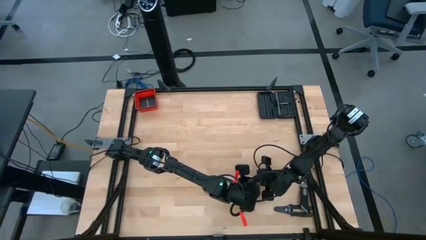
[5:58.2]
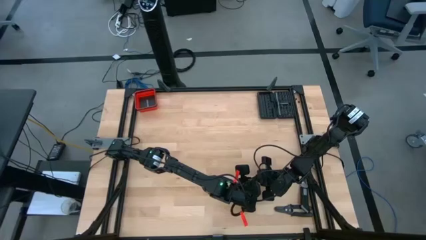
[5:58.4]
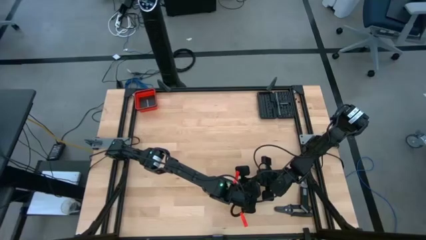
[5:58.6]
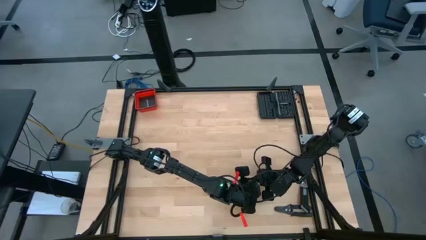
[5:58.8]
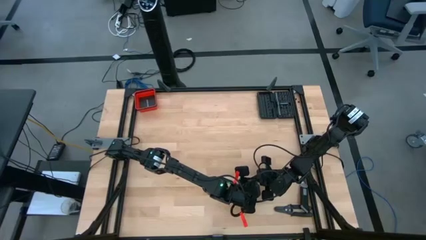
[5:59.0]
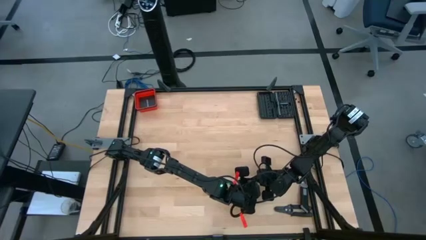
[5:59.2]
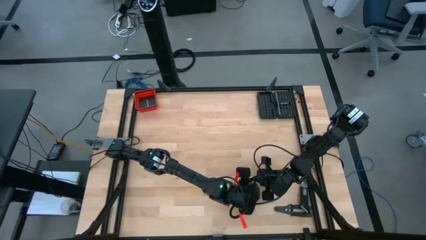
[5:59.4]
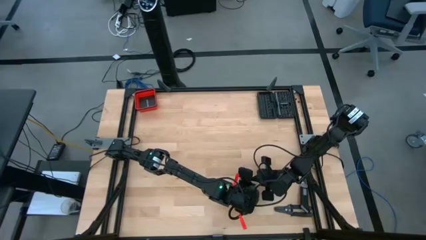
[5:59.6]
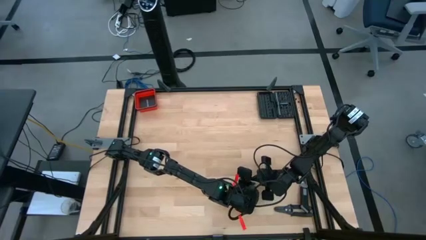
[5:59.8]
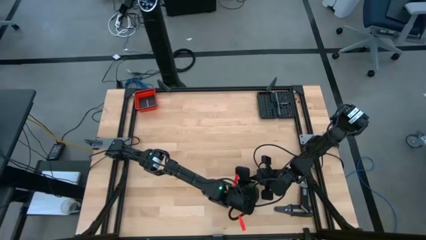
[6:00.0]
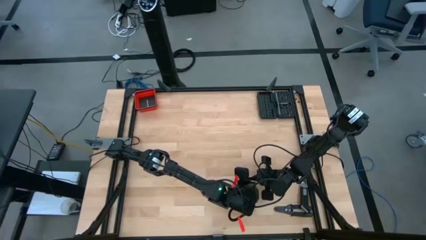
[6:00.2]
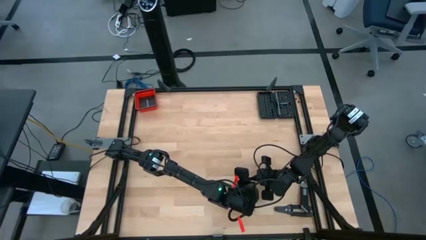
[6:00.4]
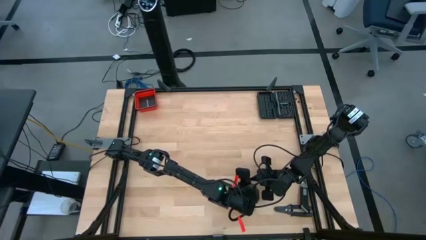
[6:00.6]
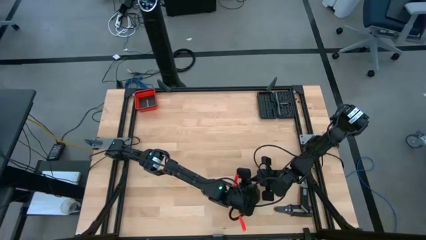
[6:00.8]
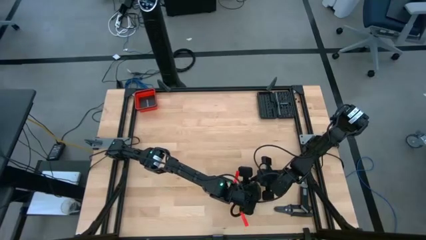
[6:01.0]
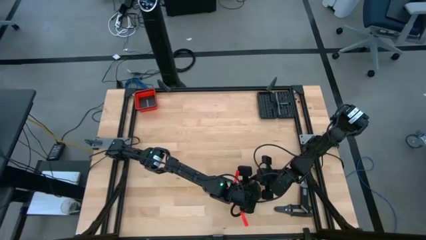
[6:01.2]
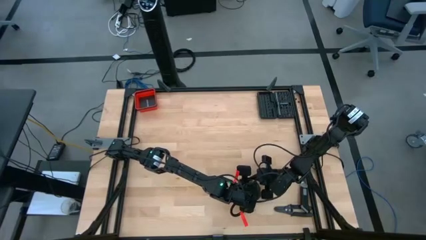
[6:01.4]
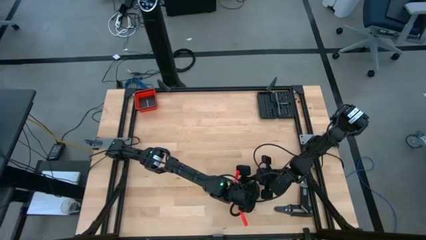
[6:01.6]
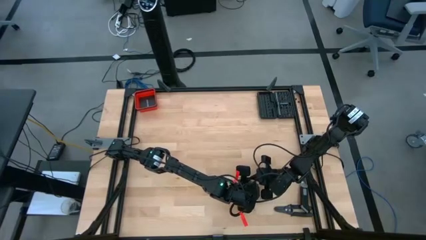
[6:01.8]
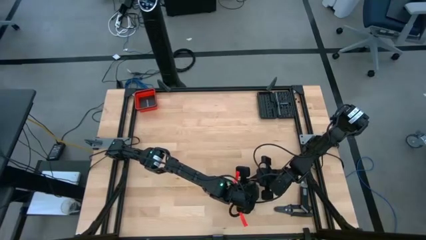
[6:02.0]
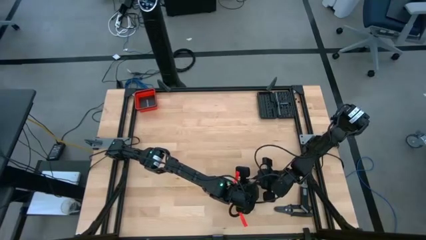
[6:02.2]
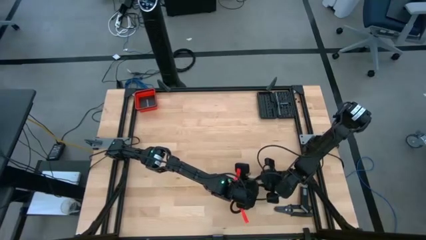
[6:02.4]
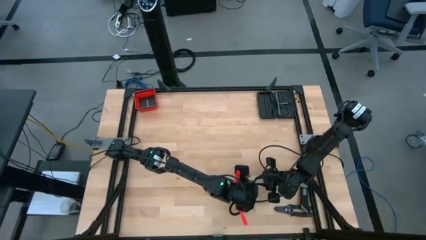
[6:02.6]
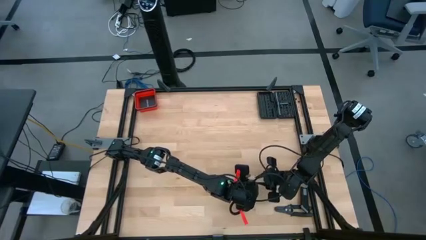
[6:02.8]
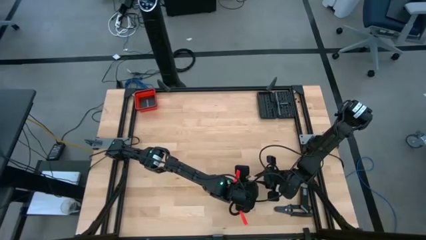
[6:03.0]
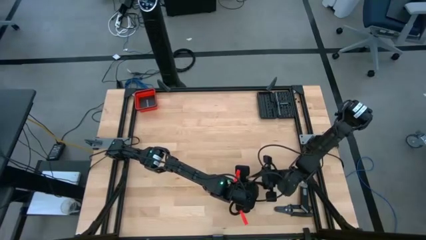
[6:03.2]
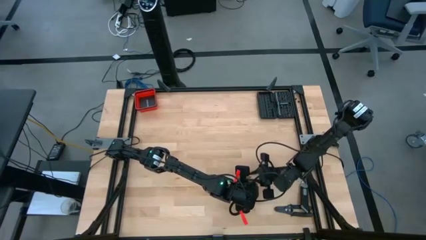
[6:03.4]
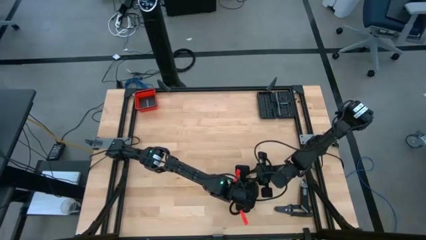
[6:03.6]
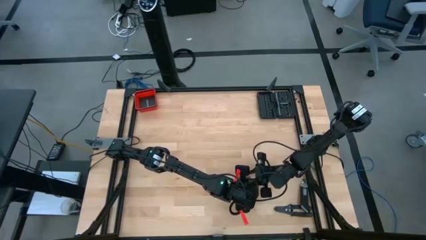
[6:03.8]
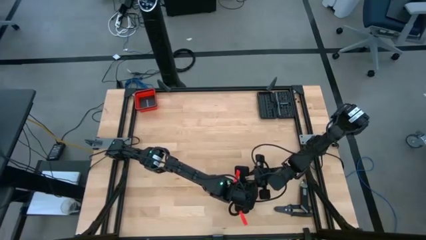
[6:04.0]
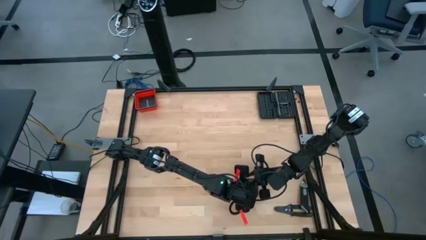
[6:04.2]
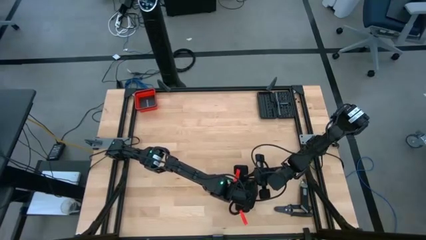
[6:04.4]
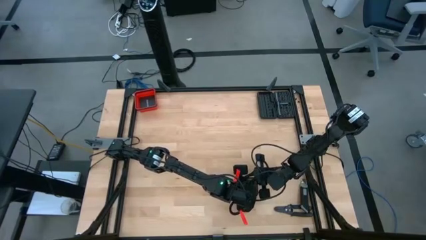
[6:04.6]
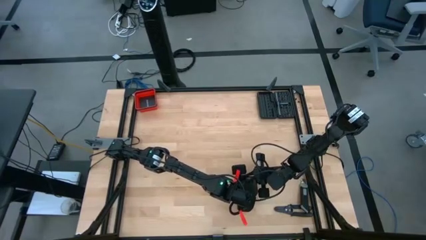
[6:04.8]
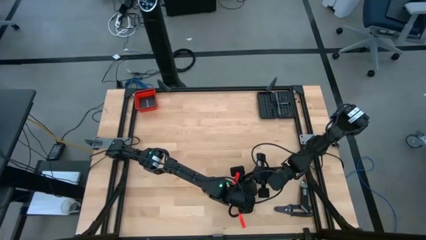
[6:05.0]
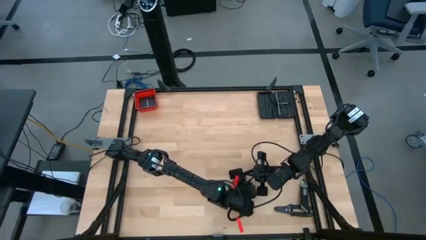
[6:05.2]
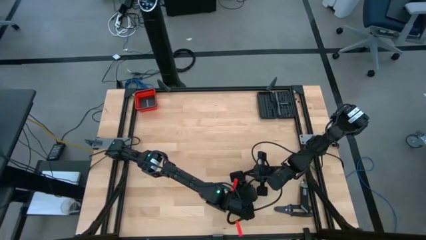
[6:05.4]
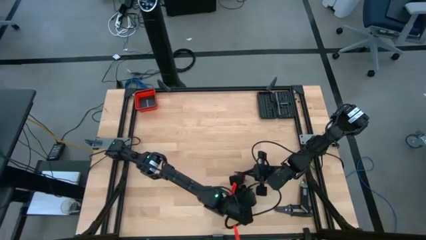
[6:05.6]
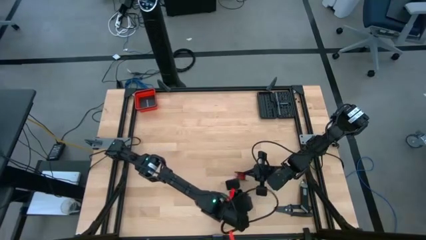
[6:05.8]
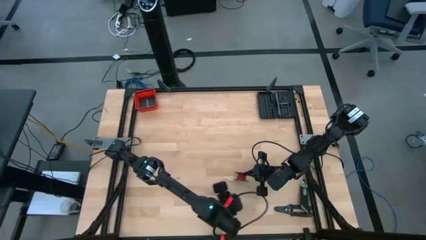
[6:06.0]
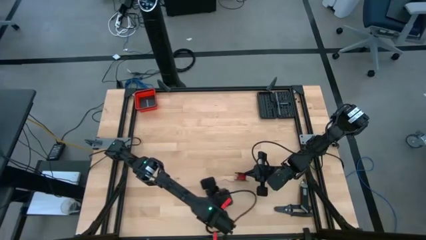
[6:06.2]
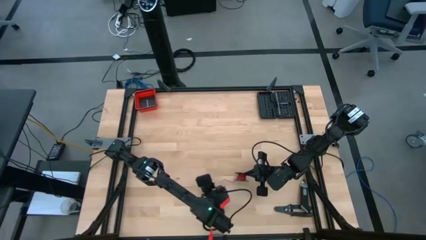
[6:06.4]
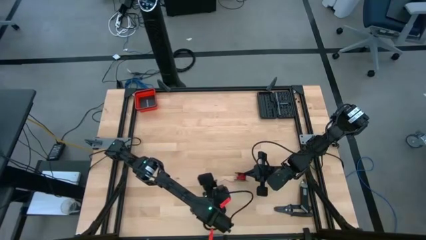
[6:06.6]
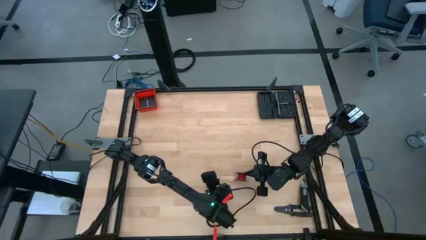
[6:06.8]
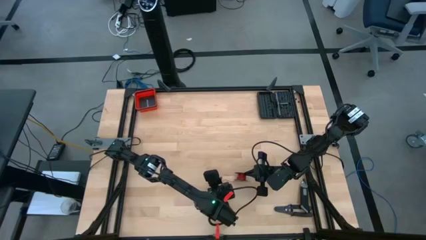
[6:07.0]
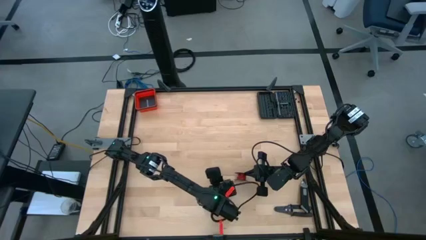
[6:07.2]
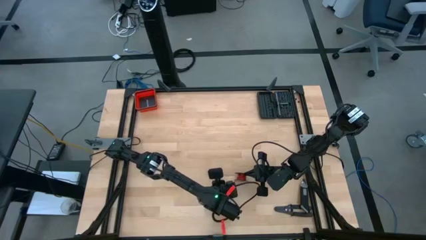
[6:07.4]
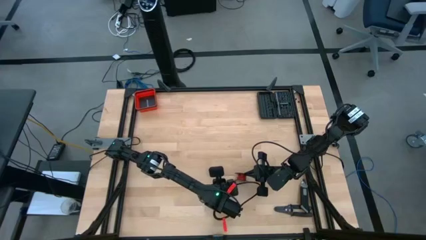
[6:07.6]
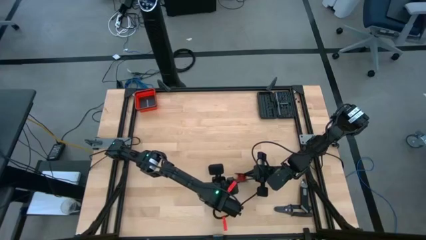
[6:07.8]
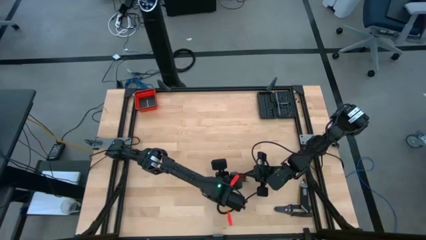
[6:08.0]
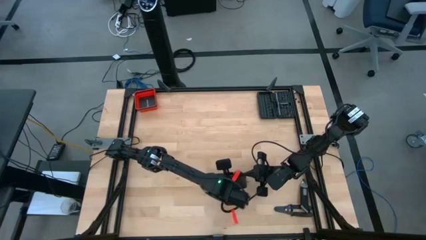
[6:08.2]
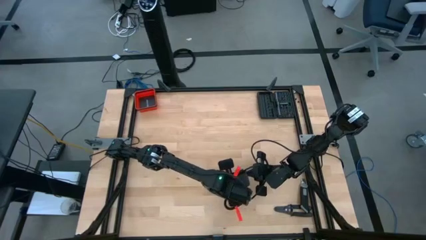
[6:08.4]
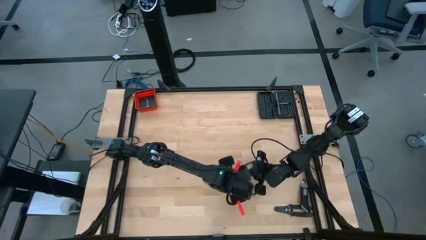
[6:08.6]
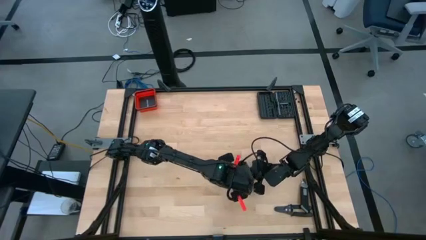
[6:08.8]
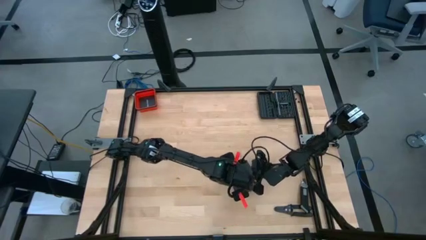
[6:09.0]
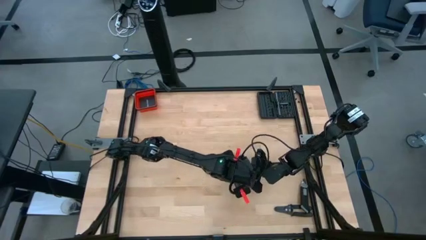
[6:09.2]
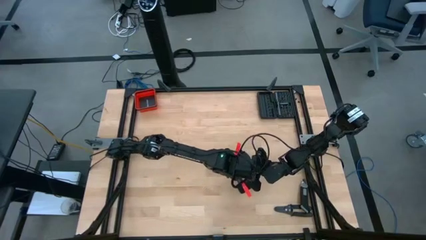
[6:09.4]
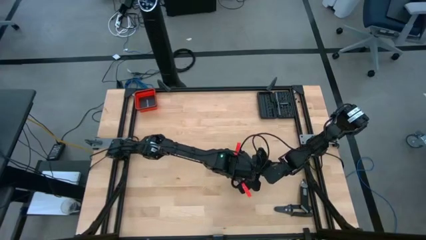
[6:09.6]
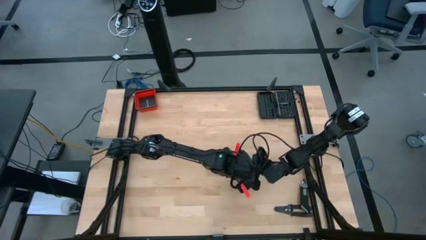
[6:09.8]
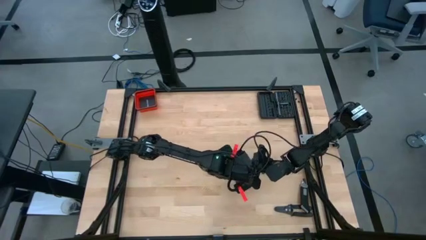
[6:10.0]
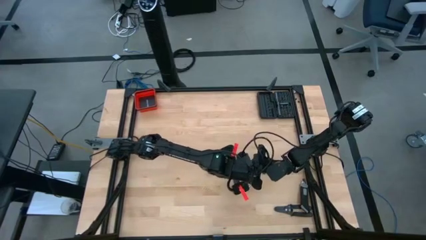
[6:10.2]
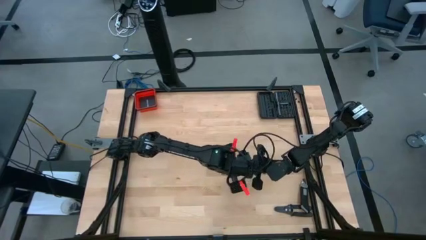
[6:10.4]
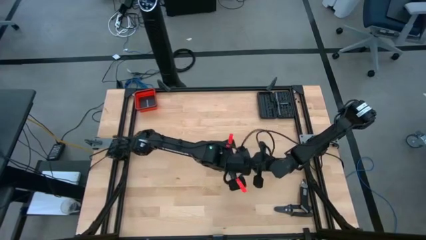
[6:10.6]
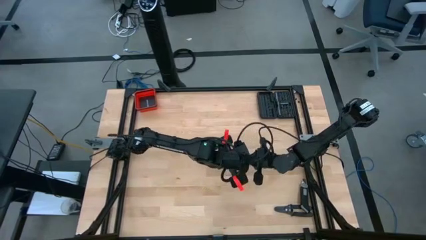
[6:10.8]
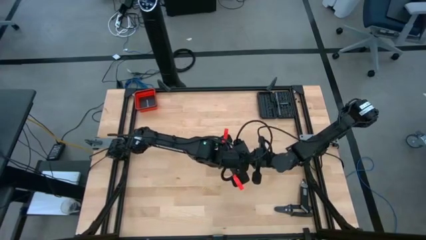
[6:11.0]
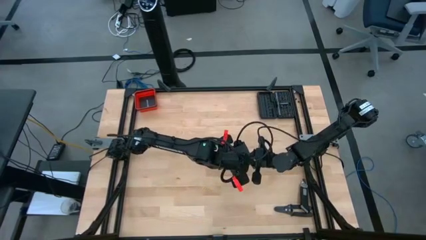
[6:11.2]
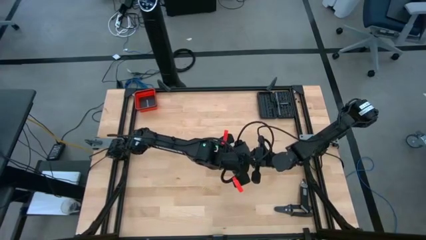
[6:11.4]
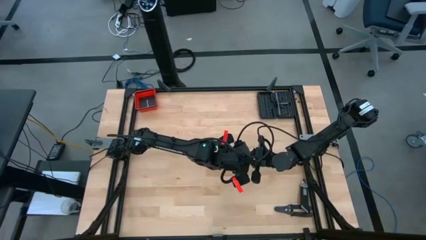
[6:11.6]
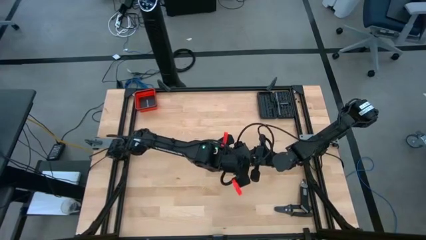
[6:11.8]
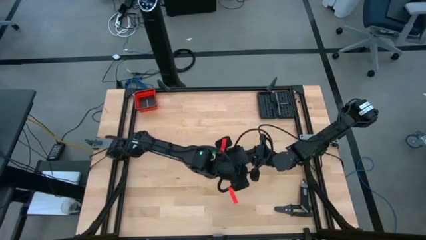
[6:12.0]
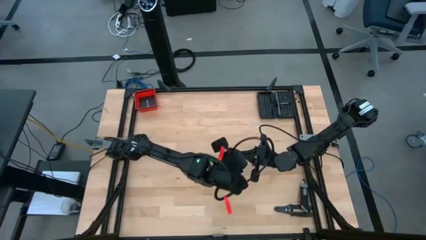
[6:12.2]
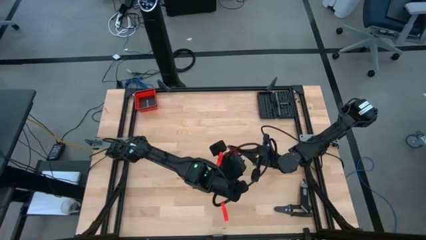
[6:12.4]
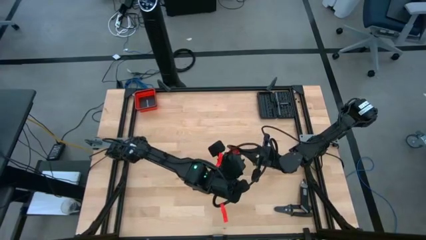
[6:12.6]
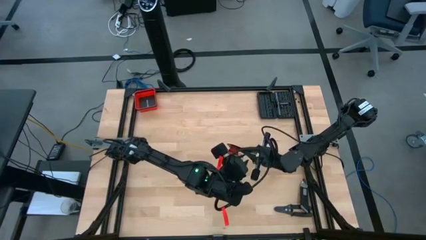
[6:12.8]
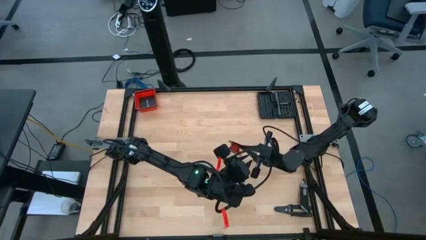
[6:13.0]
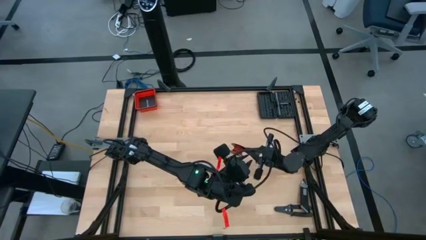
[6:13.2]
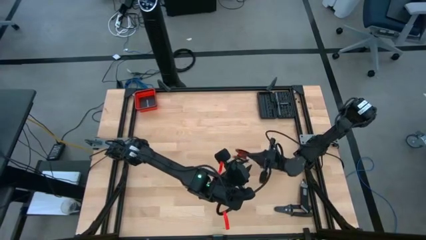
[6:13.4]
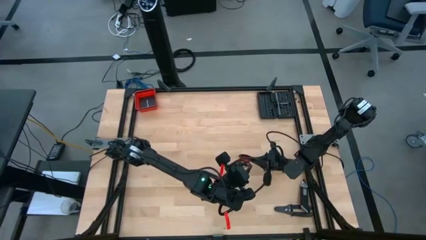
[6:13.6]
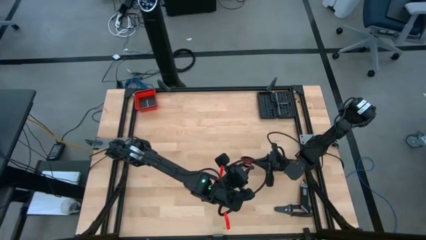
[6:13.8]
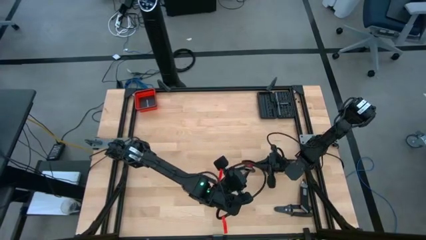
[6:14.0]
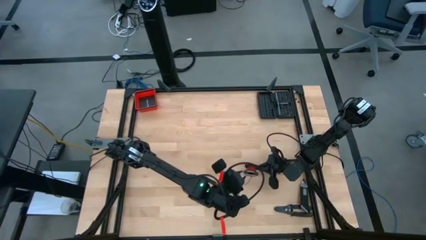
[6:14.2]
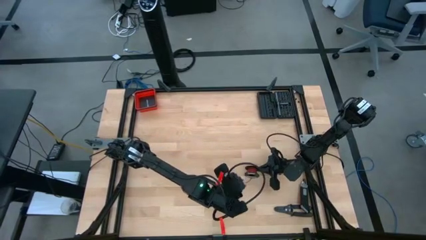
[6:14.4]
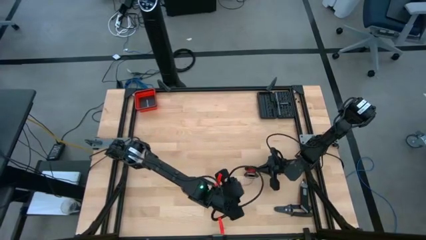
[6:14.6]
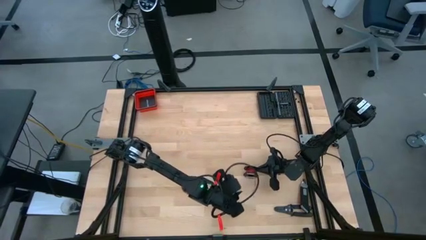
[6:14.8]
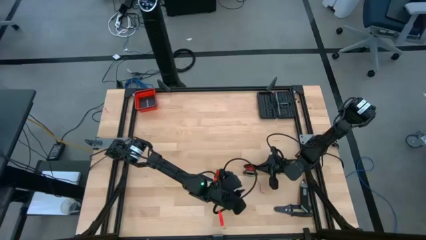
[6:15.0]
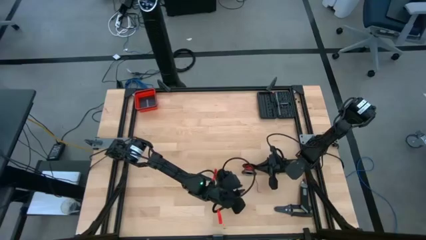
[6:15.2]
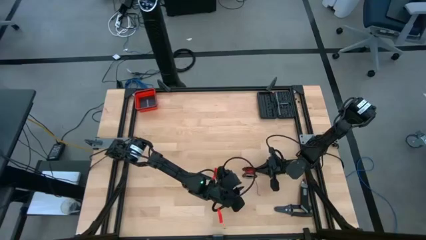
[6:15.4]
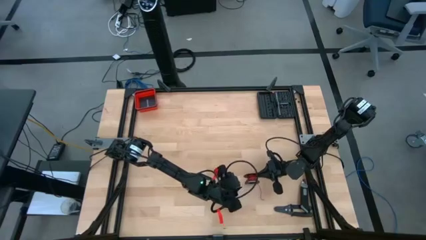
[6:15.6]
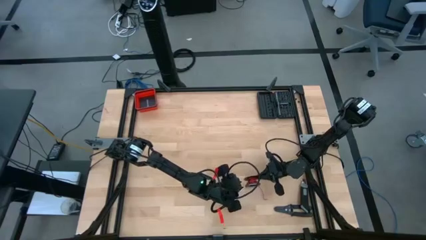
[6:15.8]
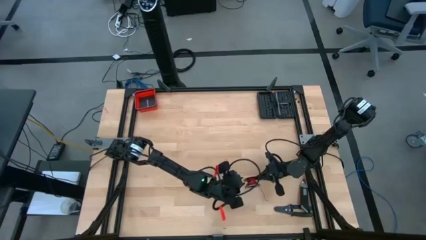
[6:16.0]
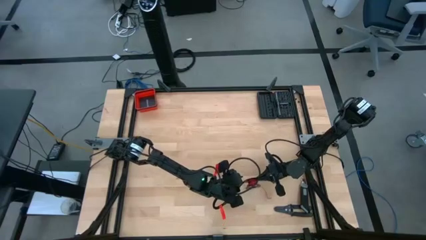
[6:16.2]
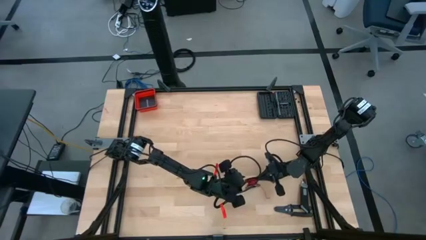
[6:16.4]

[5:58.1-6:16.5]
Task: Coil cords
Coil the red wire onto the spool
